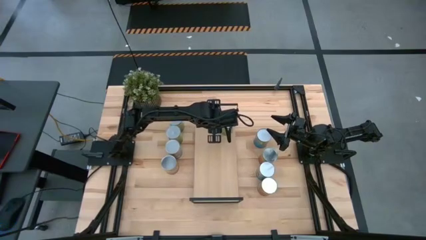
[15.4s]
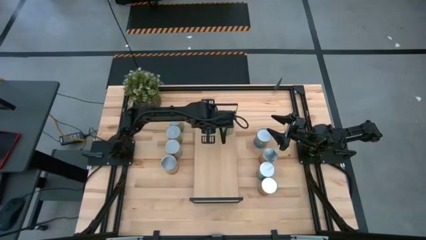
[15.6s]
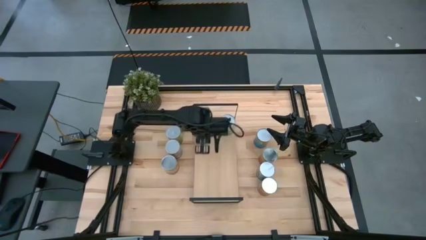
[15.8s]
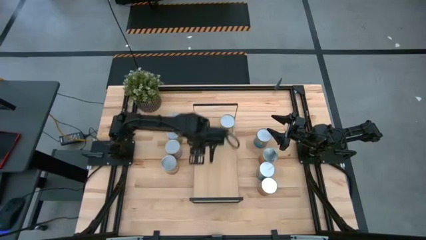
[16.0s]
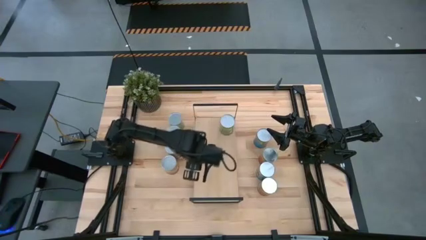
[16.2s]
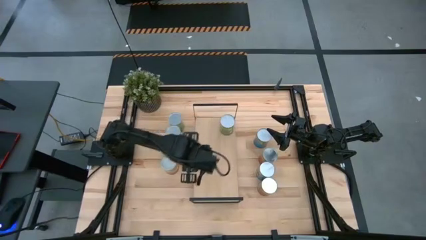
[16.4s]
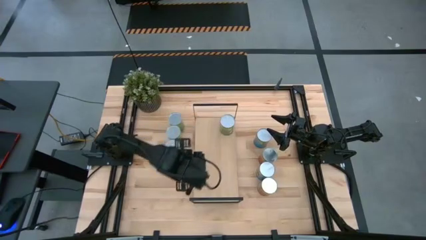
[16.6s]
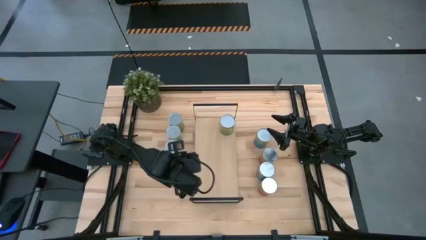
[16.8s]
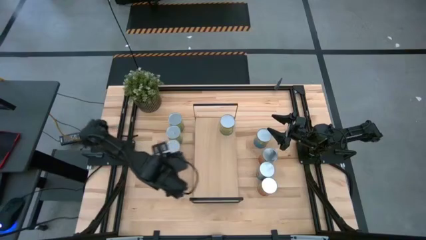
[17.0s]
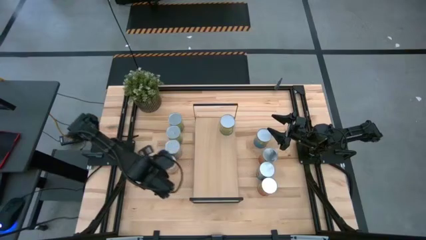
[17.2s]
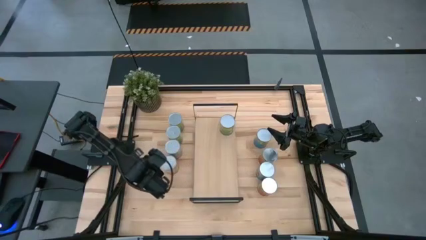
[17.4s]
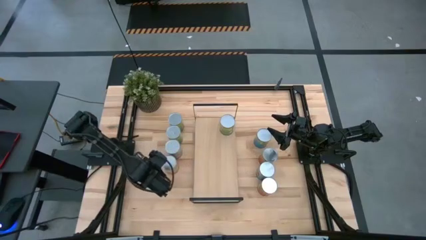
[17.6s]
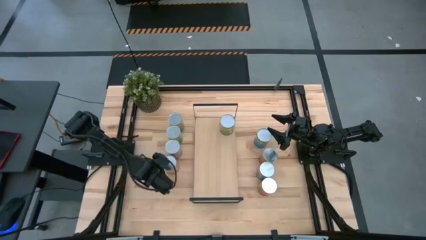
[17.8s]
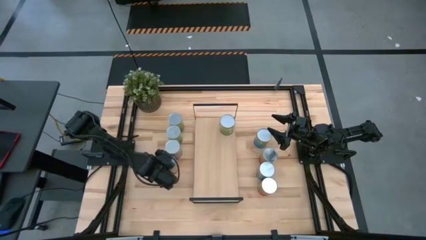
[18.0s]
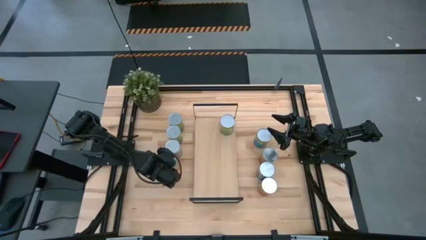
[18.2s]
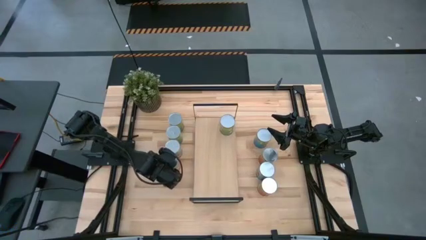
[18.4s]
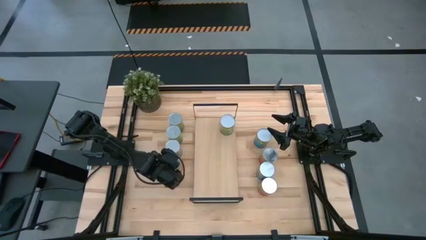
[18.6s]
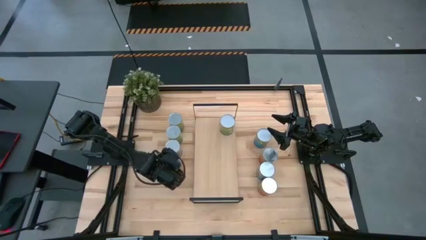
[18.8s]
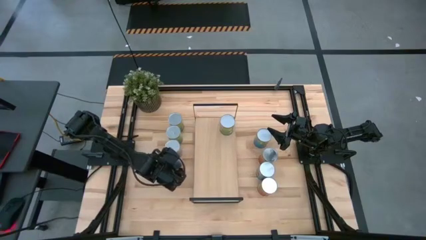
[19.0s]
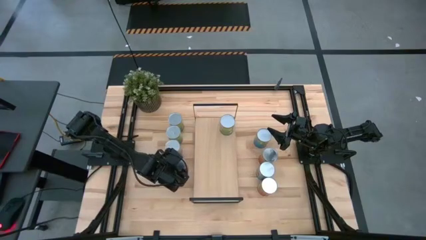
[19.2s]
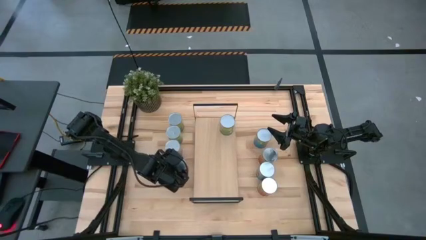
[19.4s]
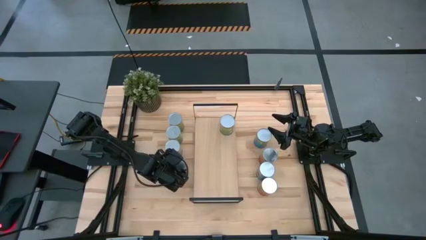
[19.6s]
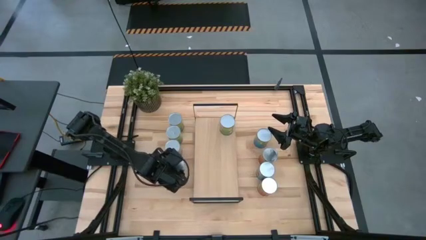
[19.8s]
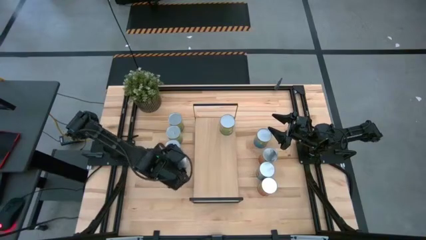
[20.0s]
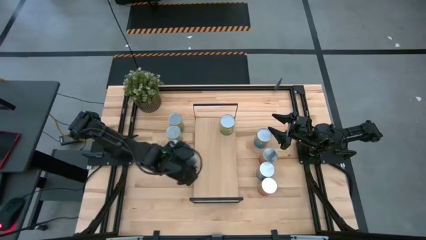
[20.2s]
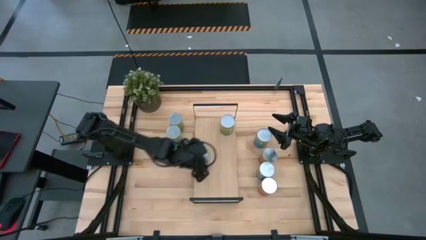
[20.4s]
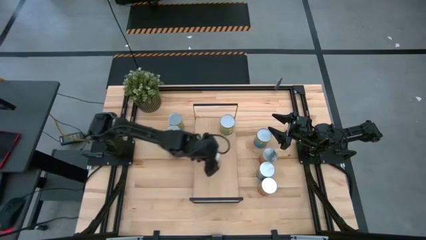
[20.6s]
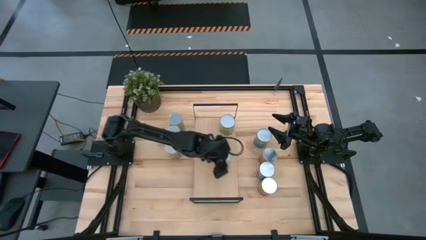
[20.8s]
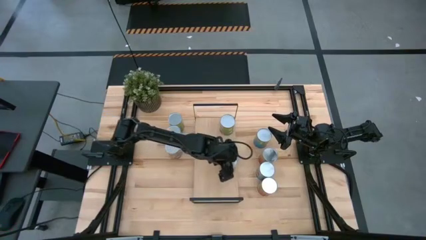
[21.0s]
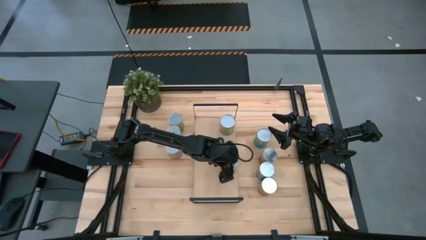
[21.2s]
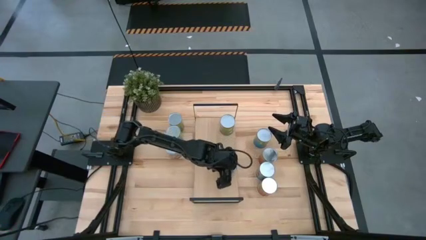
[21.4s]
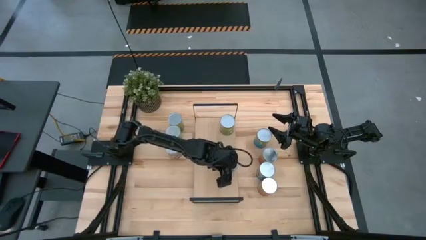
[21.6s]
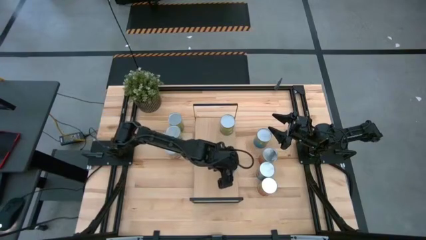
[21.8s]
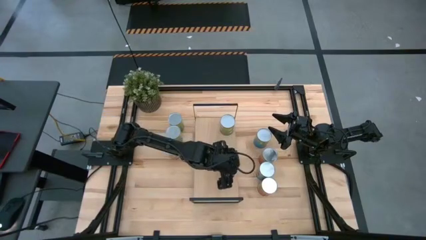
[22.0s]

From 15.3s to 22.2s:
Task: Pick and place cans onto a shelf
Put the canned corn on the shelf

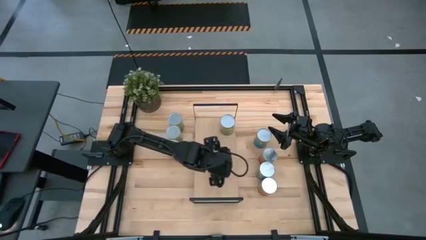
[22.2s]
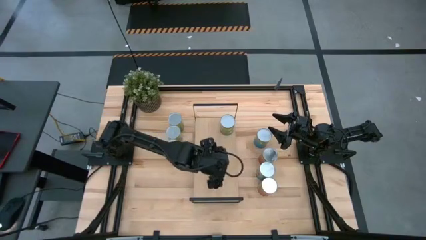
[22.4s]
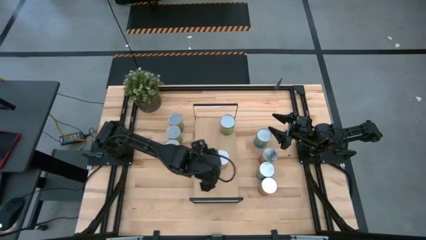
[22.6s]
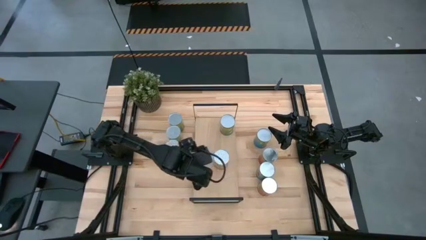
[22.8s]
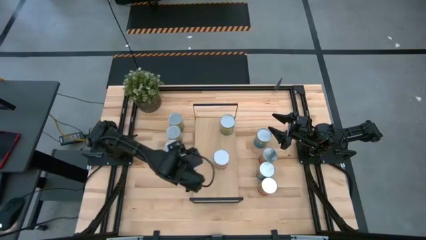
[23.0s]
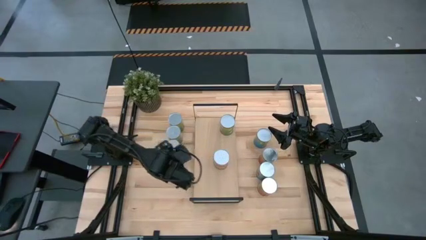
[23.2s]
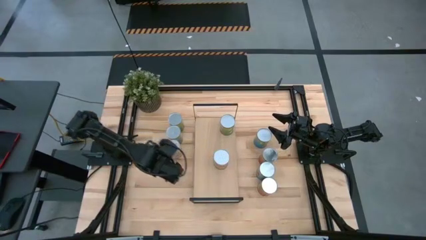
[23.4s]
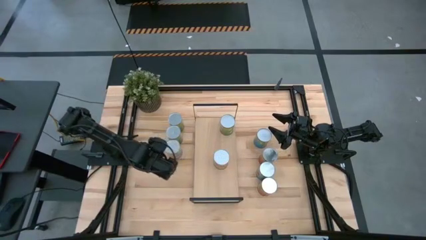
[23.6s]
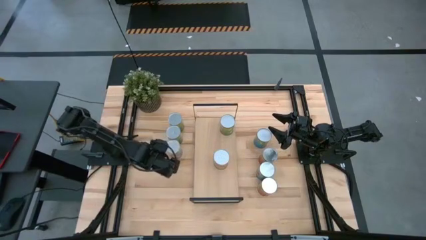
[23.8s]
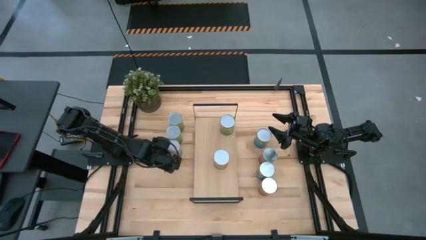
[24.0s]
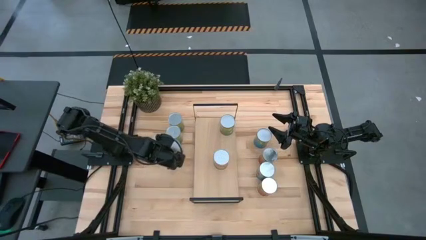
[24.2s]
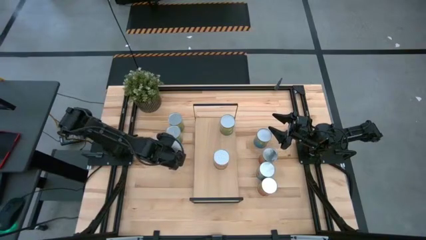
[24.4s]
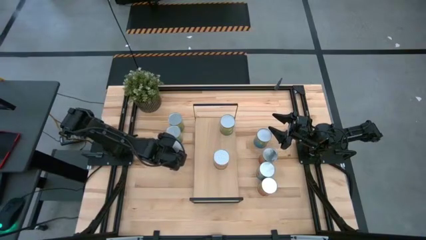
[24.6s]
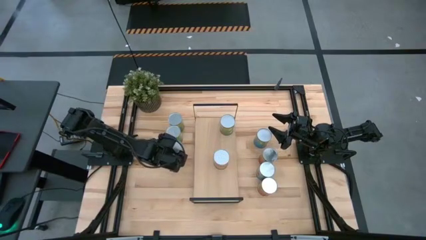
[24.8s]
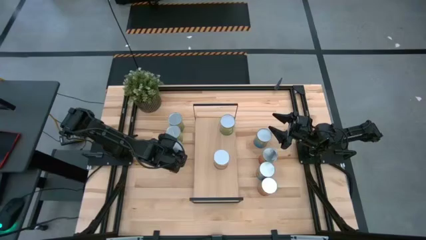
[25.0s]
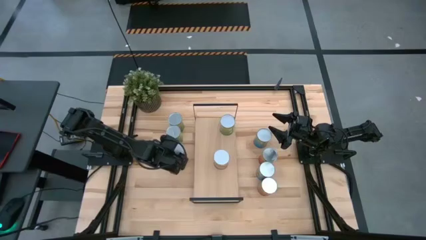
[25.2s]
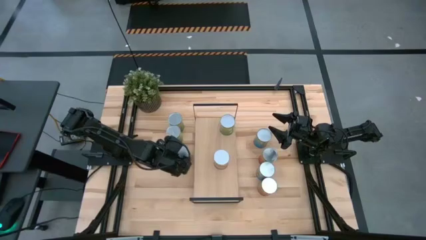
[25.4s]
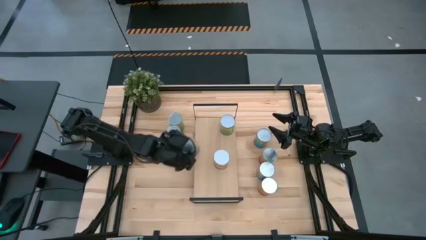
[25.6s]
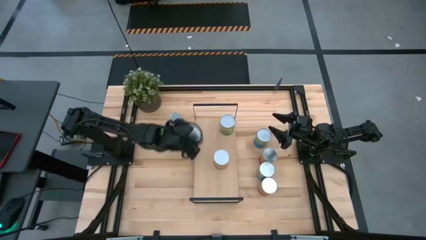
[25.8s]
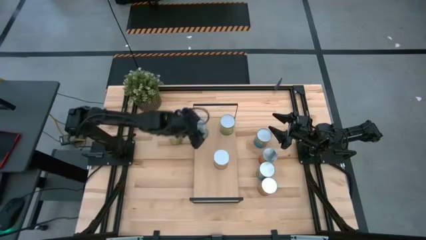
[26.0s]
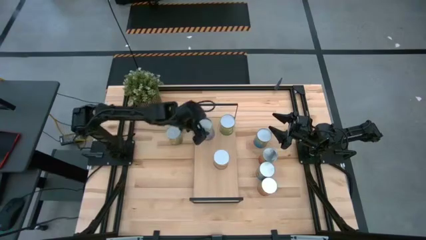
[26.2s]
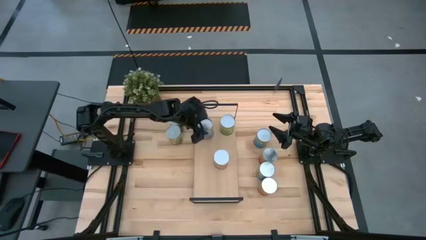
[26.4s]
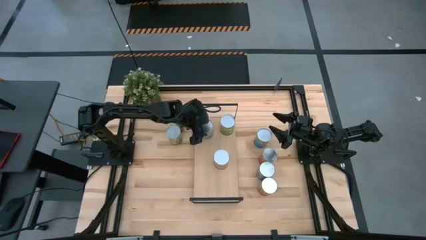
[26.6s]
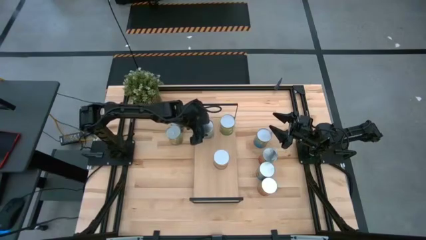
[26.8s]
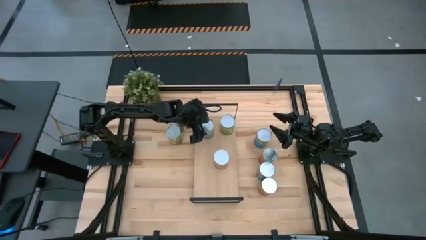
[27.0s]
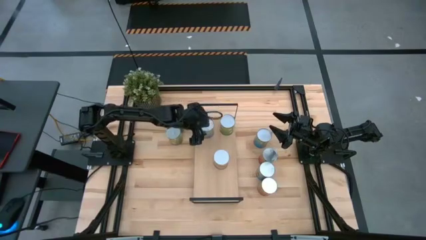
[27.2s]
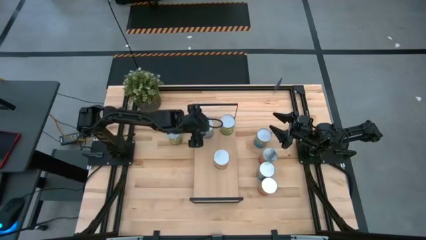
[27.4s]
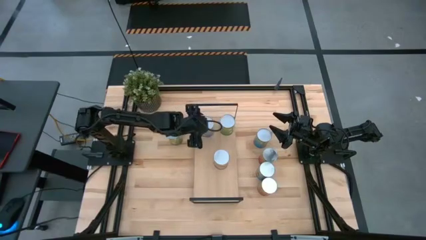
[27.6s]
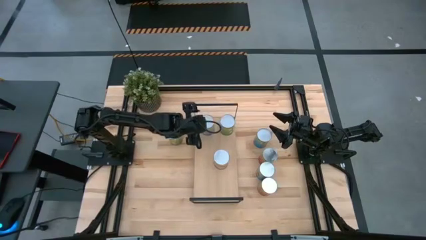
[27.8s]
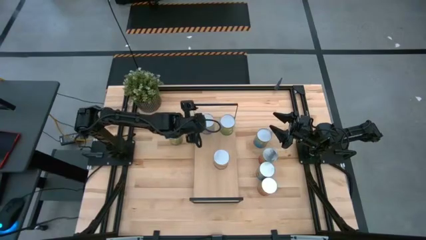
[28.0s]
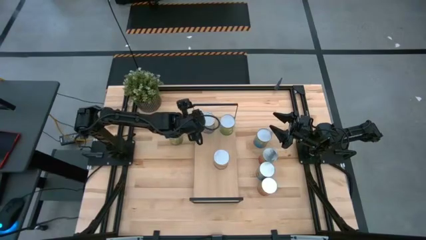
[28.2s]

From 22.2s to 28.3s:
Put the canned peaches on the shelf

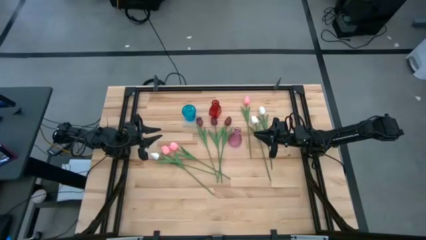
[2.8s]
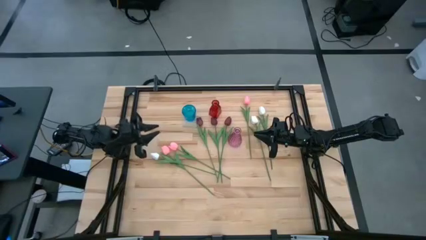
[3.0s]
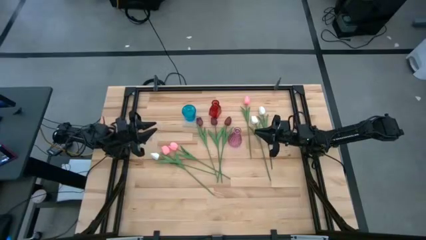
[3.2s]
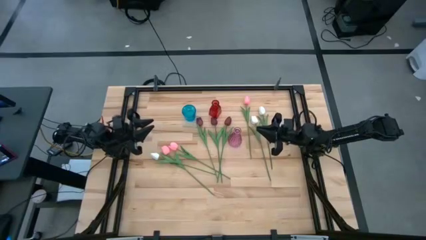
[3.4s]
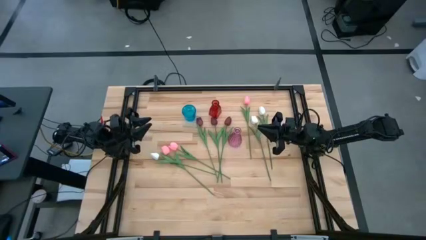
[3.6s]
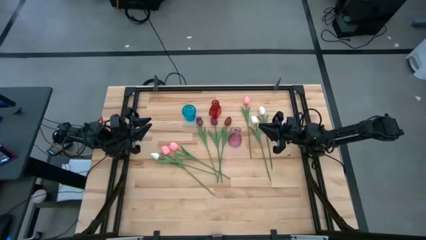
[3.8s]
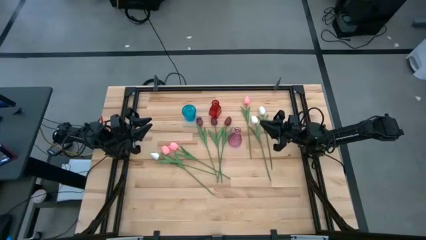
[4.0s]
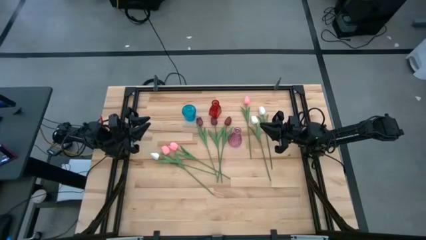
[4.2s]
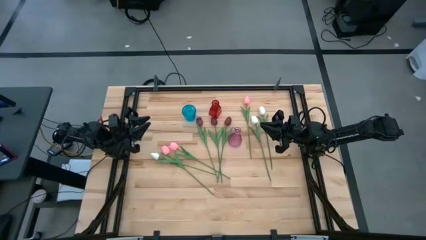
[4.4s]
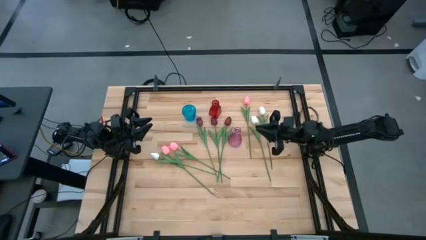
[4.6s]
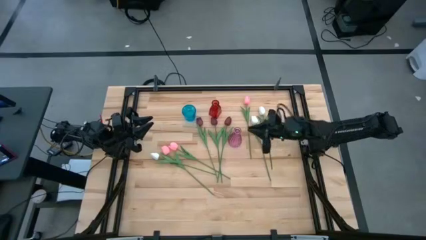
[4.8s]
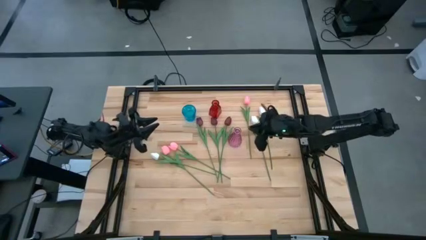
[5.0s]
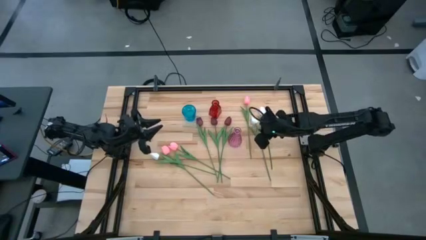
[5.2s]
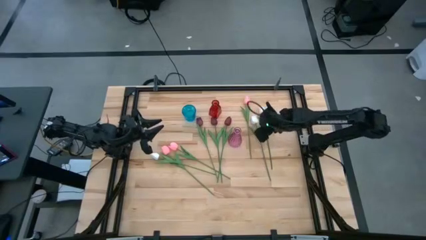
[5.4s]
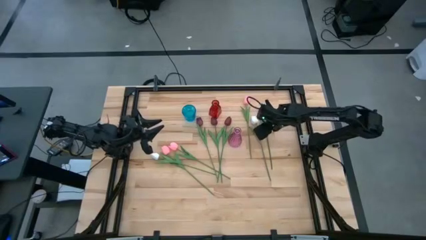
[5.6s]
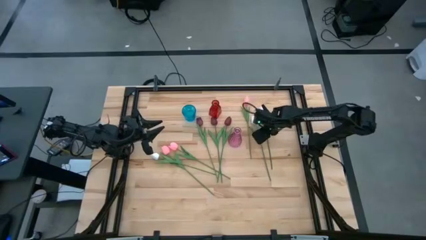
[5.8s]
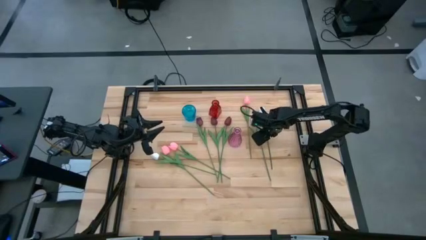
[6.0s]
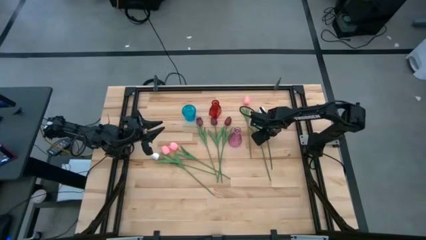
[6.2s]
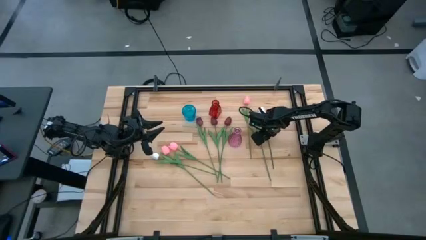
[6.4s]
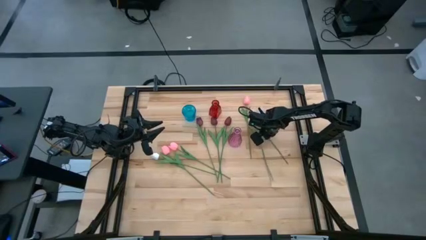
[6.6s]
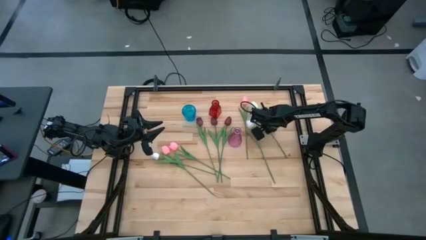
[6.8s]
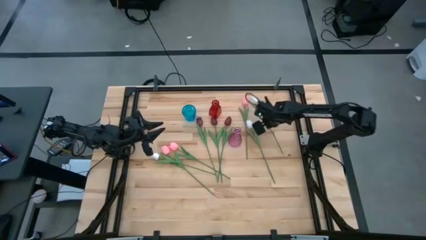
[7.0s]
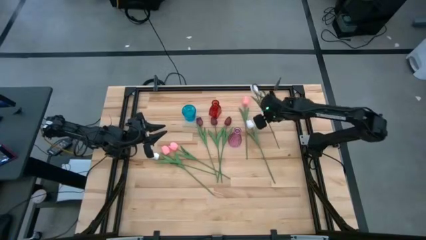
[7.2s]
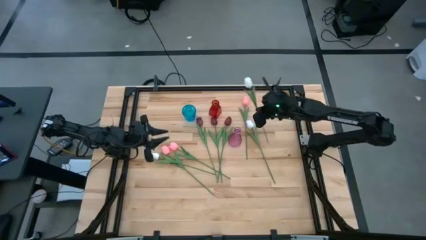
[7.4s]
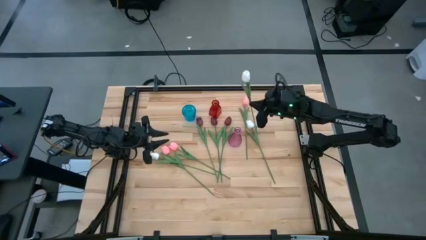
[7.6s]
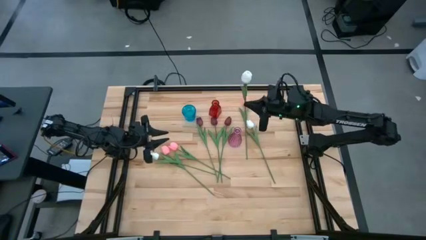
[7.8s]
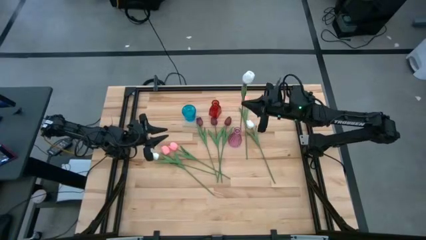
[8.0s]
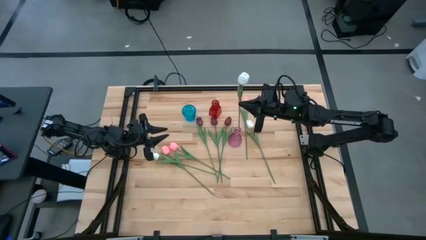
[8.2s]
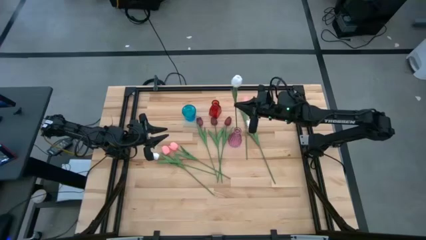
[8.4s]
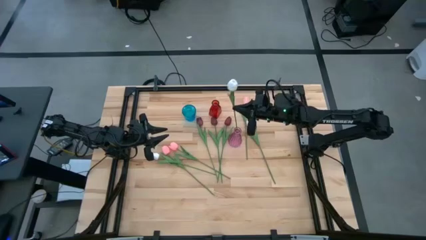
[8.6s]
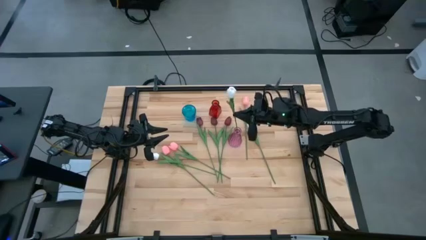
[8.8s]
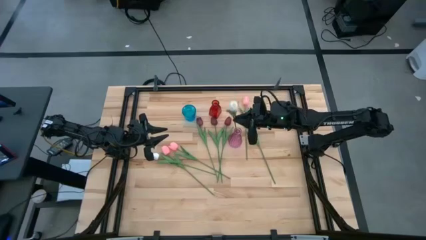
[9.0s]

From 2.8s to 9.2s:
Task: Sort flowers into vase by color
Put the right white flower into the pink vase
